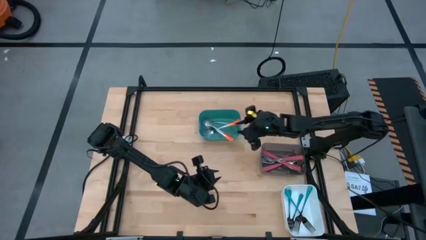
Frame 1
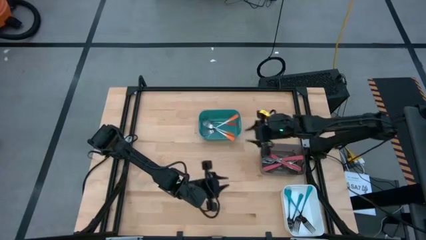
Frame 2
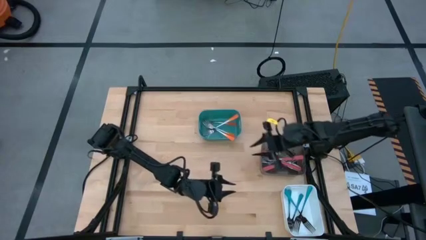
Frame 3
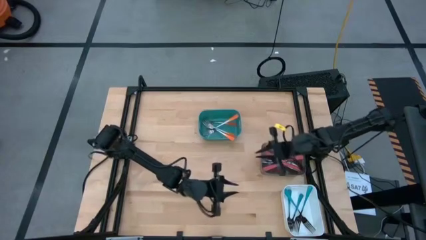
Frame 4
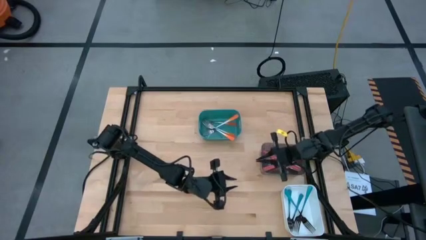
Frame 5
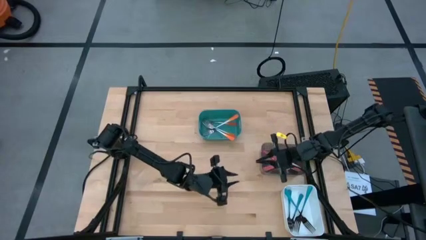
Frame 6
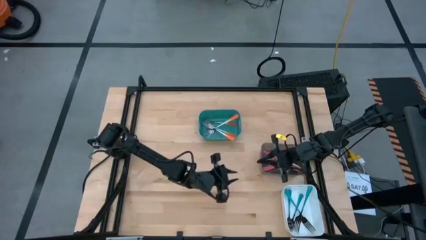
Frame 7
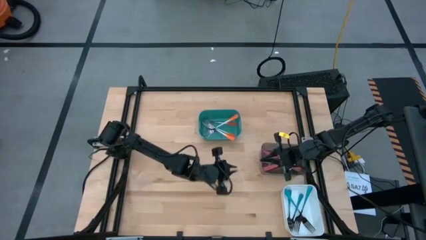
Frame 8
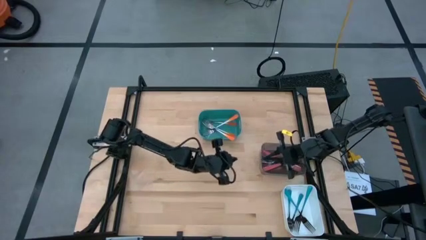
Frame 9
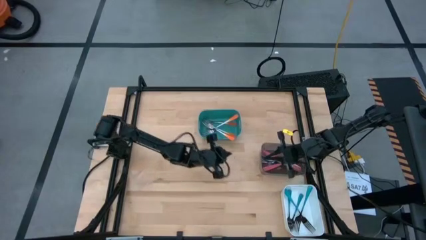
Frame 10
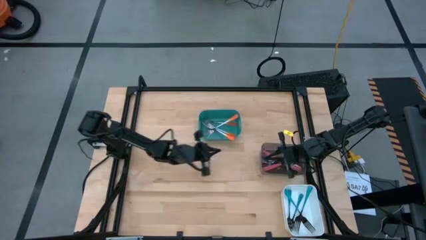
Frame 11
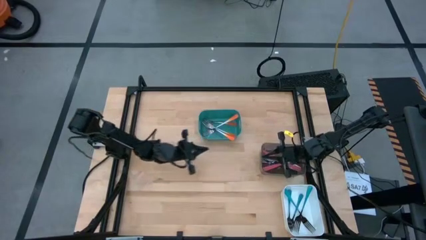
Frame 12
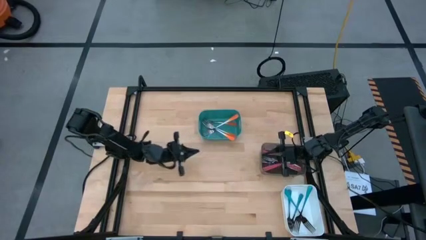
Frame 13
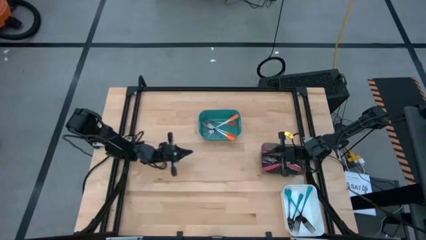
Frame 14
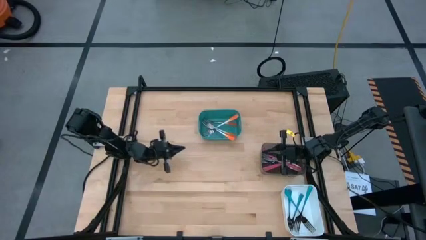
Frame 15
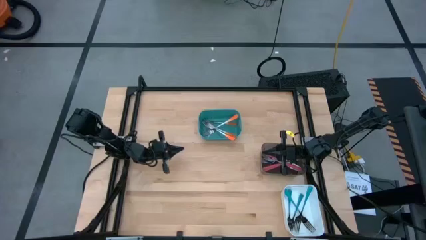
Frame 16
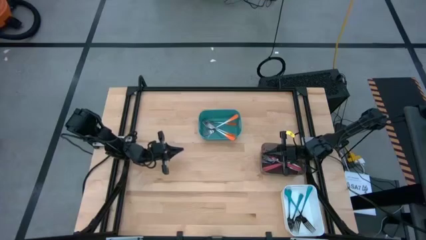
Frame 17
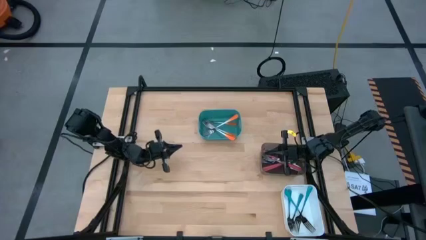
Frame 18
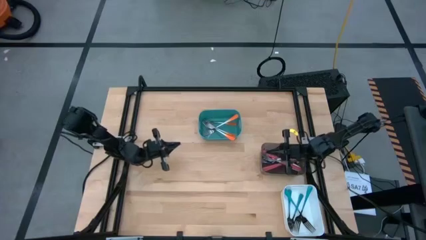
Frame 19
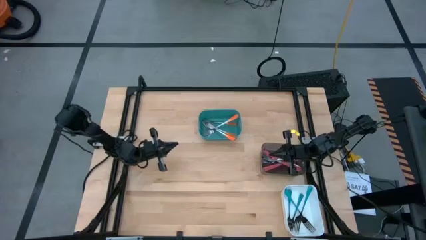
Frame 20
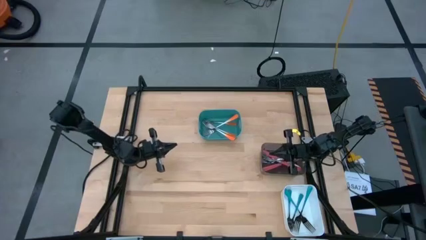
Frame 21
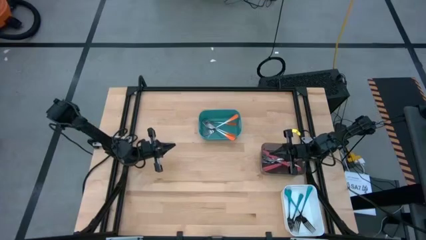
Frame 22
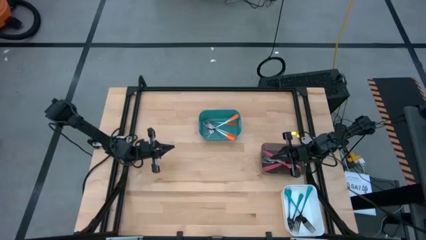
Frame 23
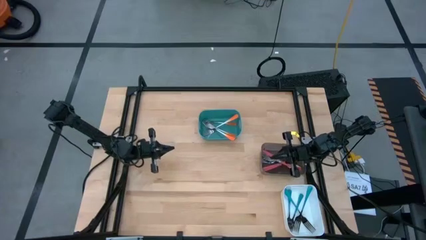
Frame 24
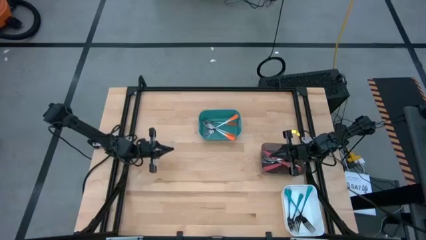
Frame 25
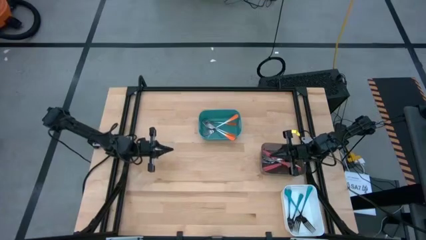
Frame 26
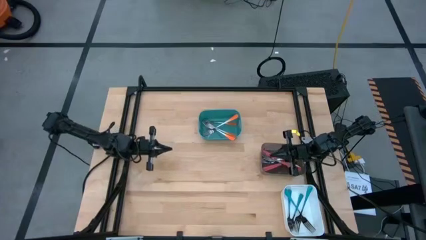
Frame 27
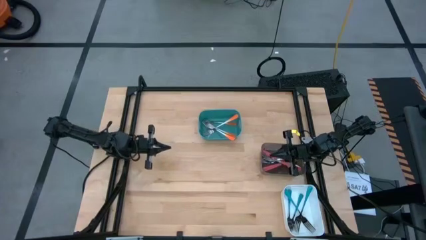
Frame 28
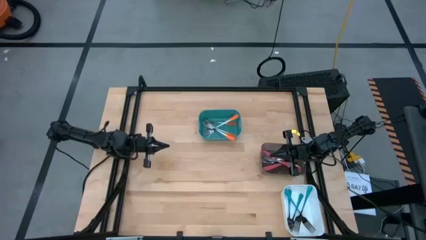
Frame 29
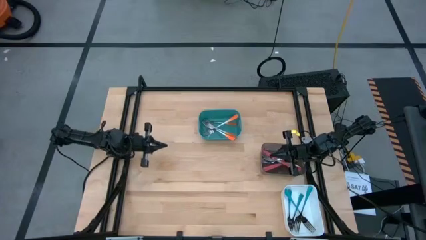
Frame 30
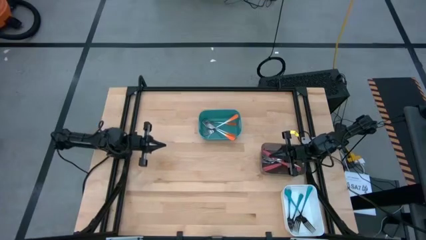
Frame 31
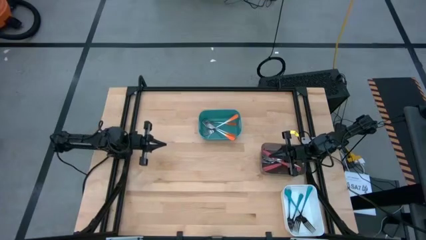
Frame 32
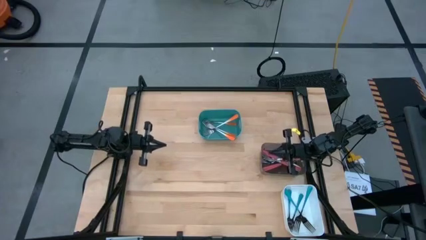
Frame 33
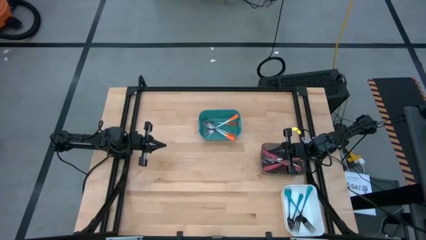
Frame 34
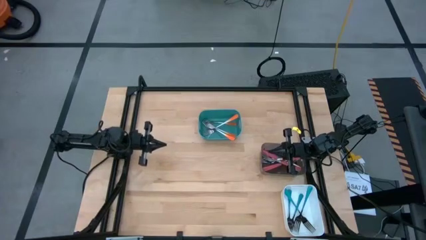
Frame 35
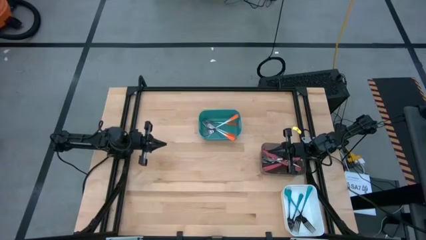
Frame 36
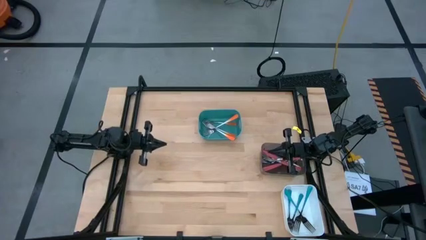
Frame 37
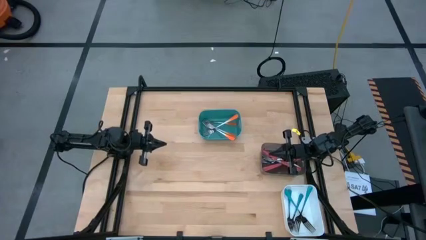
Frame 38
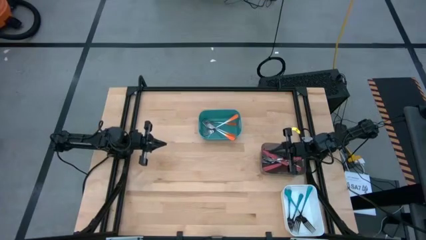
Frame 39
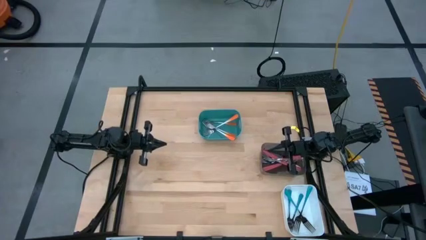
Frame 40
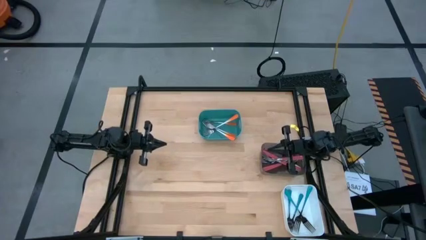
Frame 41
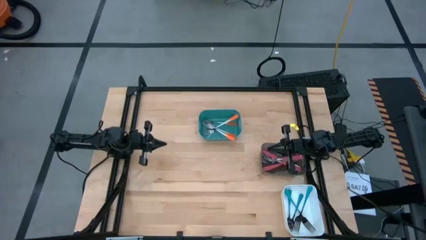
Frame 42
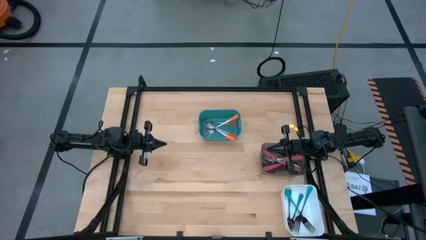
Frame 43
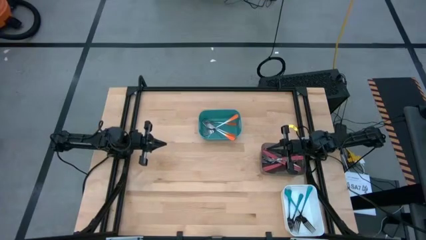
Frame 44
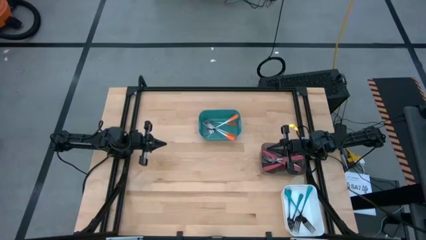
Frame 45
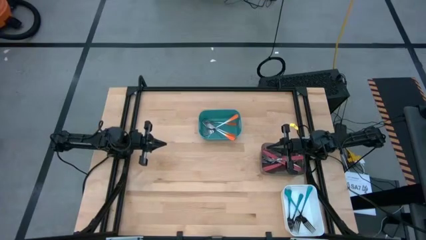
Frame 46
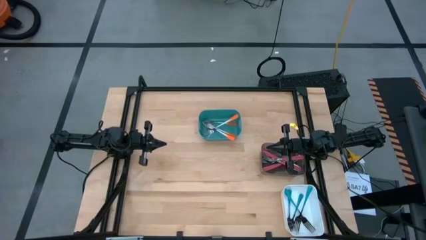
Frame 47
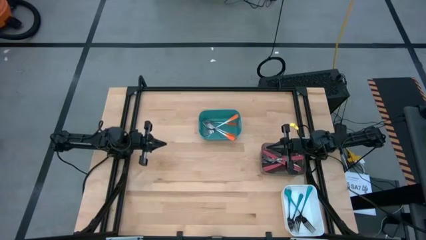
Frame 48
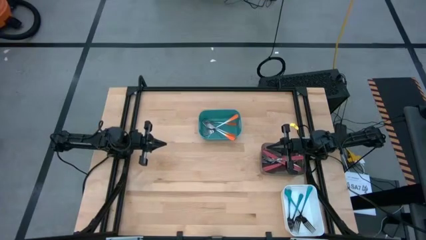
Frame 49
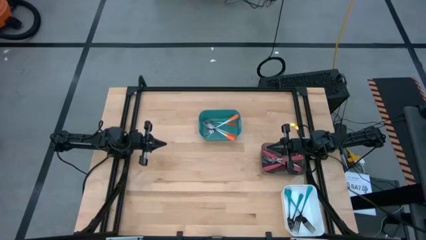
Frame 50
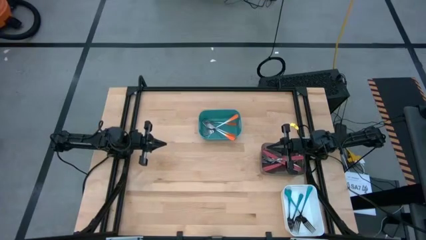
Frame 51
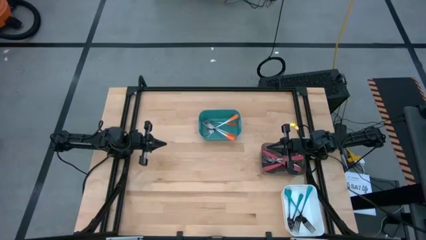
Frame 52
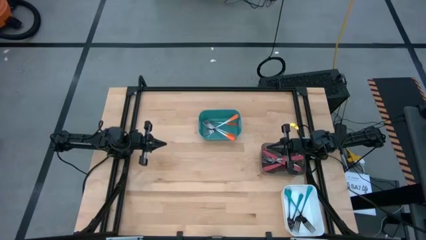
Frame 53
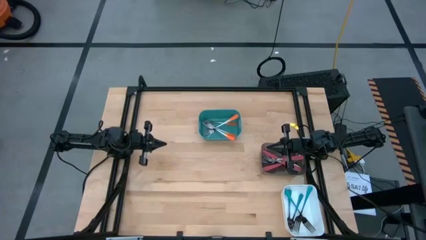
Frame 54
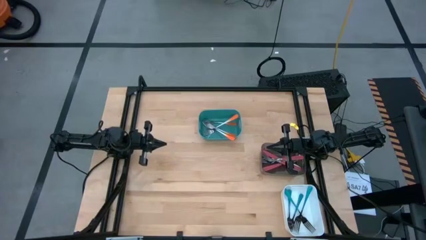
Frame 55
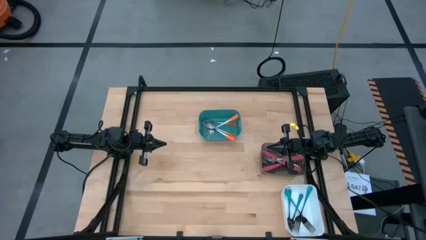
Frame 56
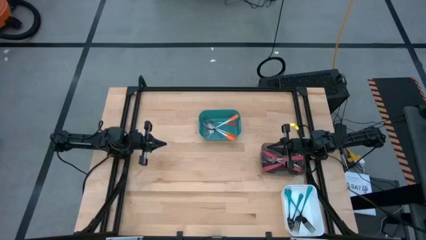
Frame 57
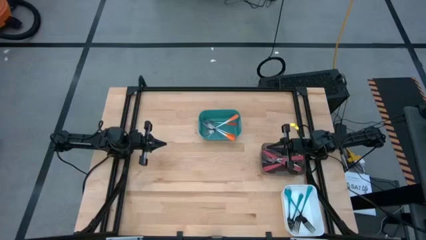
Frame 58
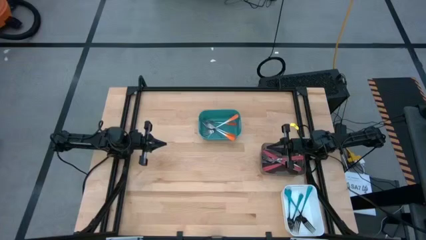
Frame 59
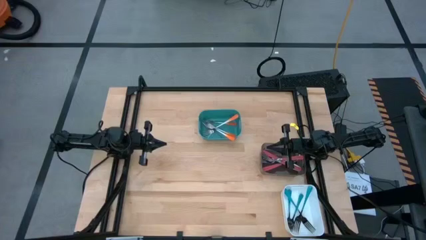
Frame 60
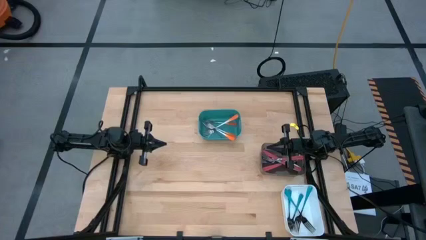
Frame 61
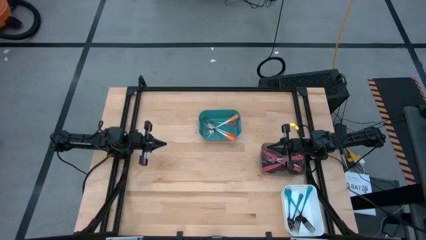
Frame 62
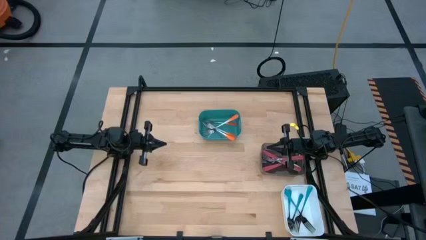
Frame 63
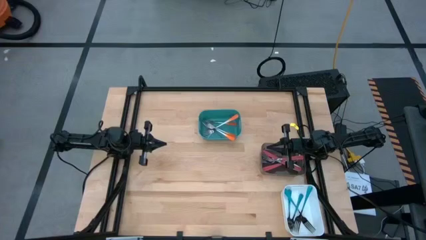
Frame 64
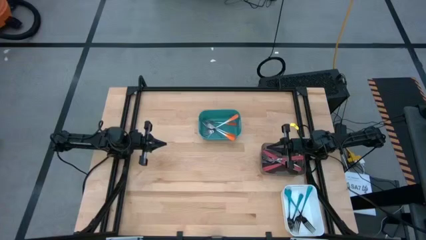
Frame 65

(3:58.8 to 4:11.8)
Task: Sort silverware by color (type)
Return to Home Position
